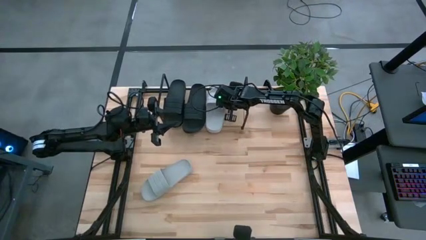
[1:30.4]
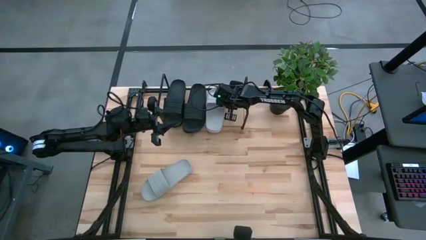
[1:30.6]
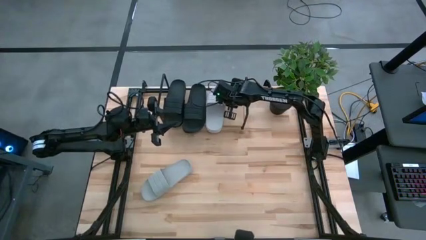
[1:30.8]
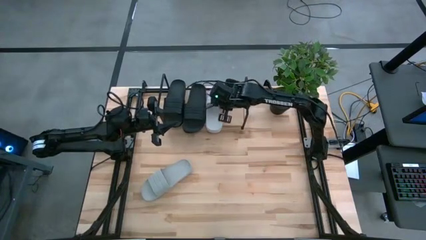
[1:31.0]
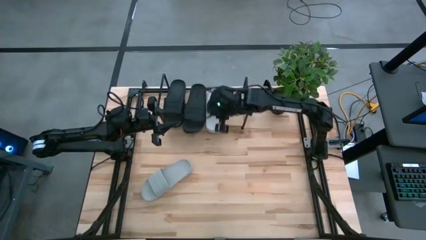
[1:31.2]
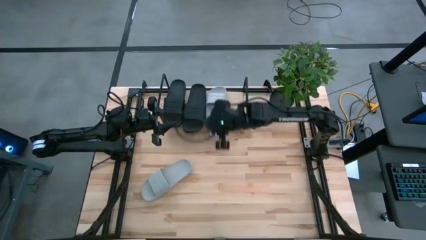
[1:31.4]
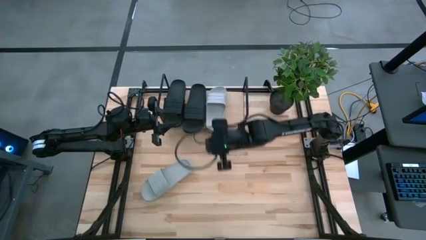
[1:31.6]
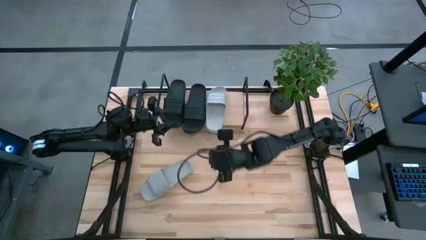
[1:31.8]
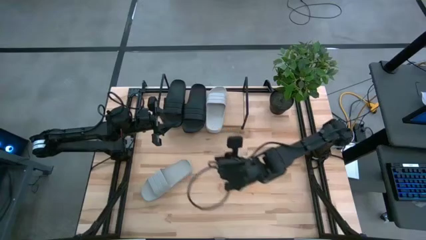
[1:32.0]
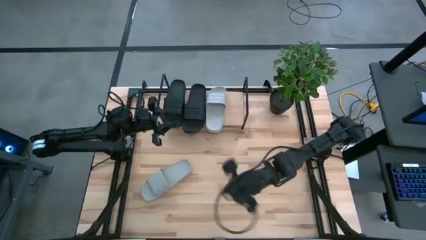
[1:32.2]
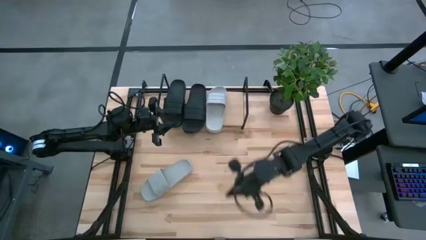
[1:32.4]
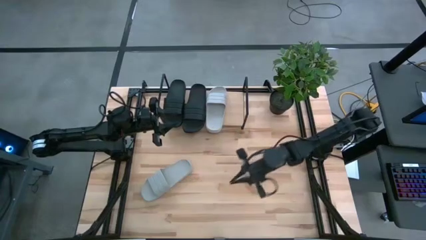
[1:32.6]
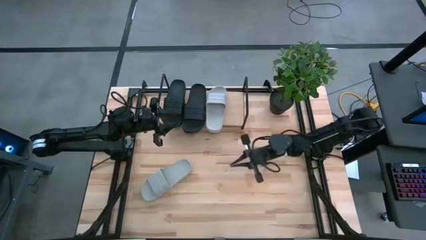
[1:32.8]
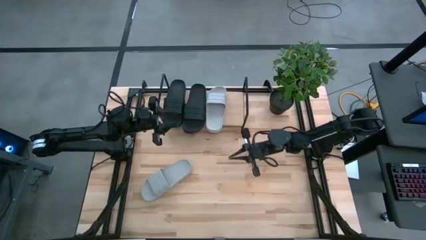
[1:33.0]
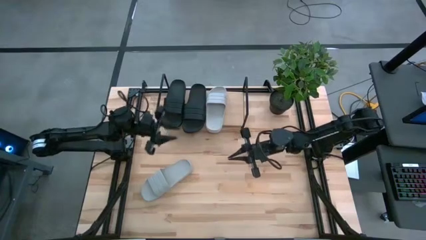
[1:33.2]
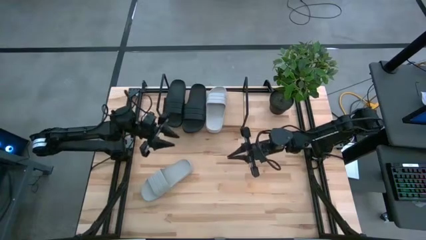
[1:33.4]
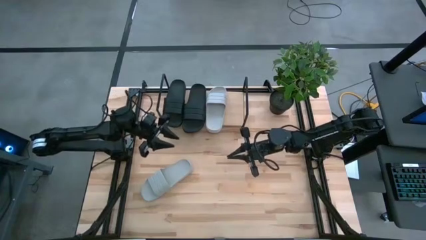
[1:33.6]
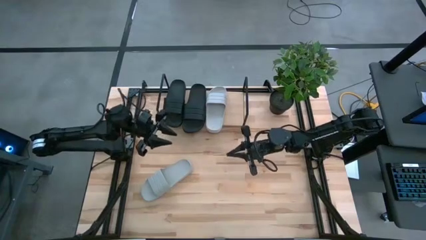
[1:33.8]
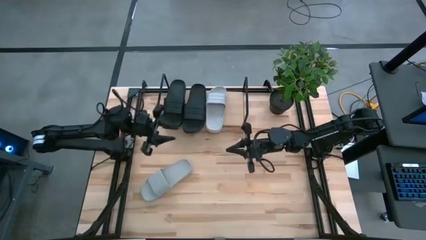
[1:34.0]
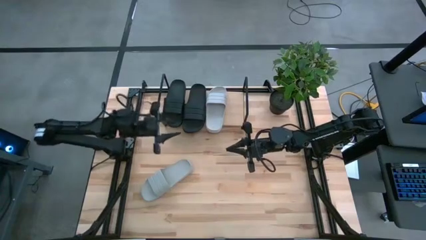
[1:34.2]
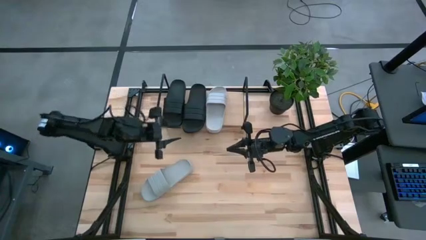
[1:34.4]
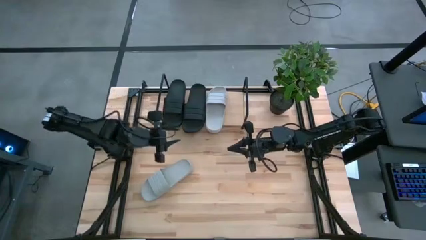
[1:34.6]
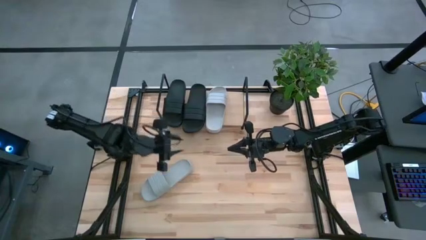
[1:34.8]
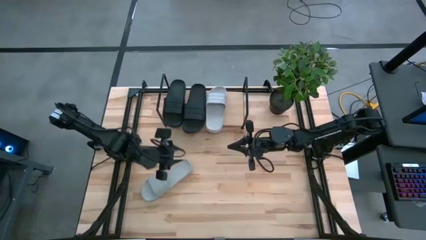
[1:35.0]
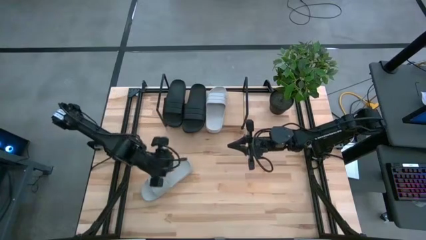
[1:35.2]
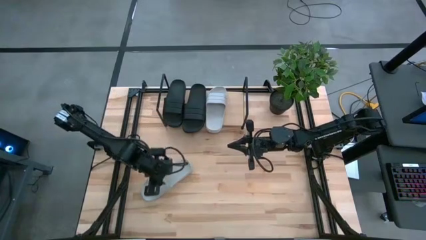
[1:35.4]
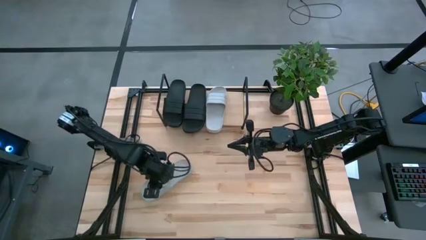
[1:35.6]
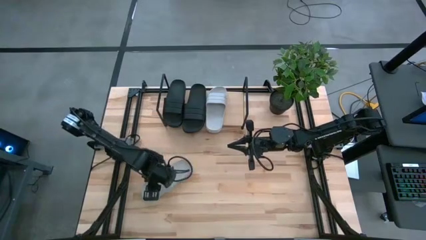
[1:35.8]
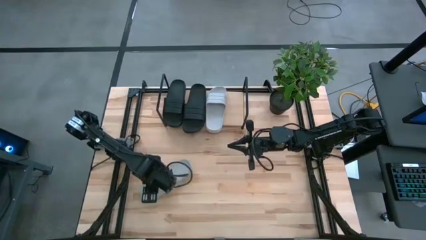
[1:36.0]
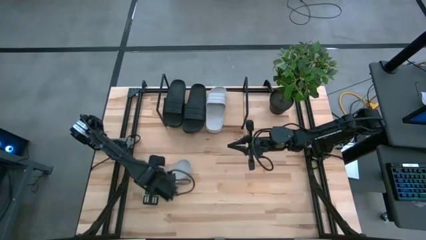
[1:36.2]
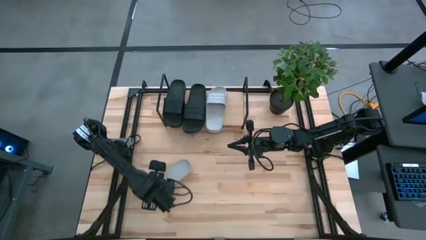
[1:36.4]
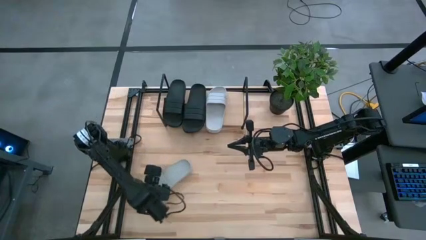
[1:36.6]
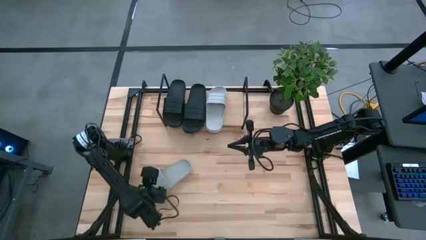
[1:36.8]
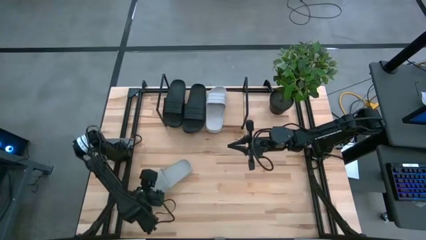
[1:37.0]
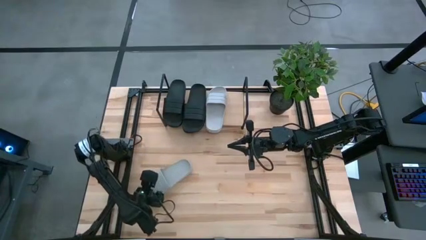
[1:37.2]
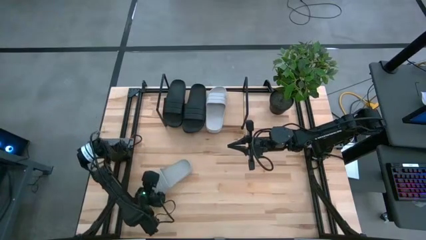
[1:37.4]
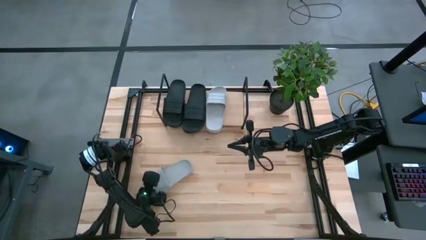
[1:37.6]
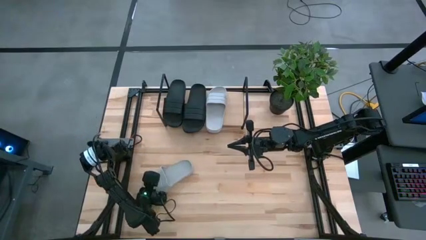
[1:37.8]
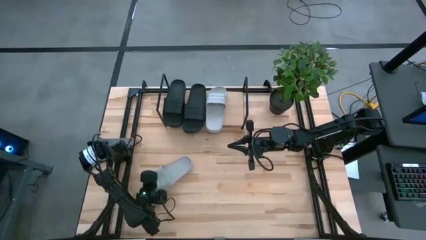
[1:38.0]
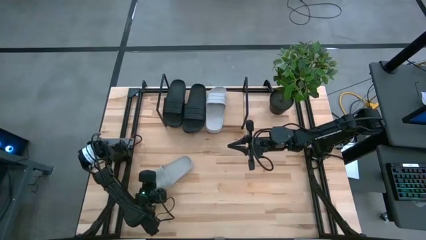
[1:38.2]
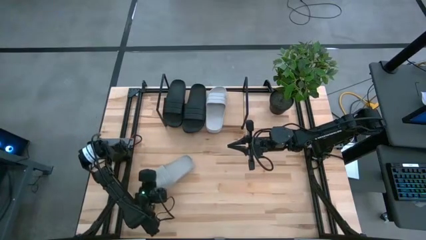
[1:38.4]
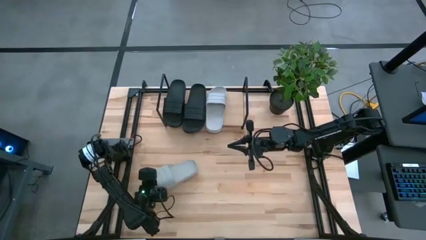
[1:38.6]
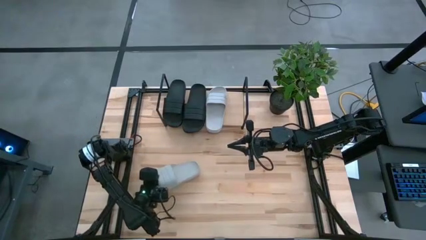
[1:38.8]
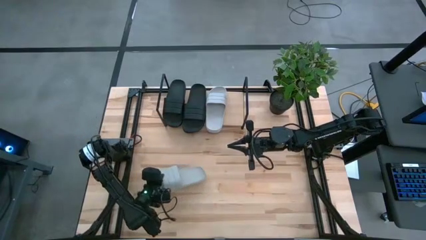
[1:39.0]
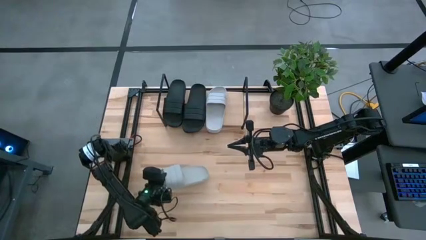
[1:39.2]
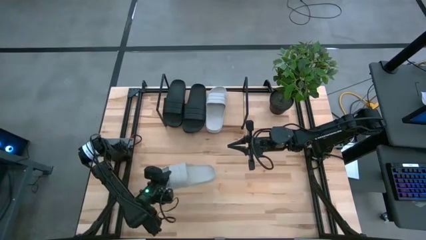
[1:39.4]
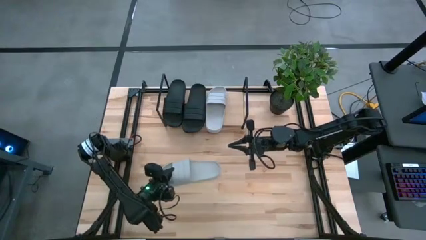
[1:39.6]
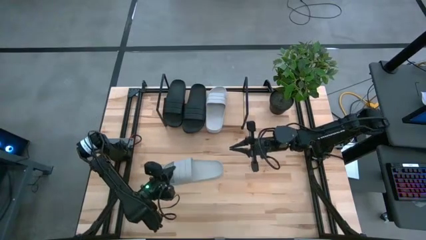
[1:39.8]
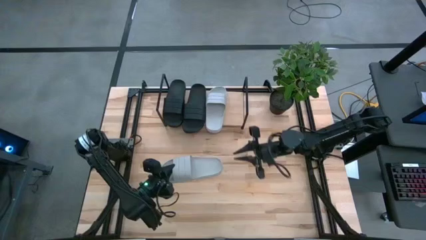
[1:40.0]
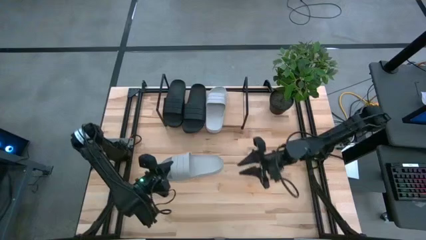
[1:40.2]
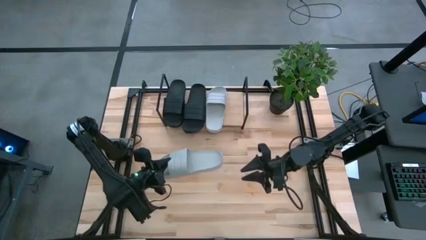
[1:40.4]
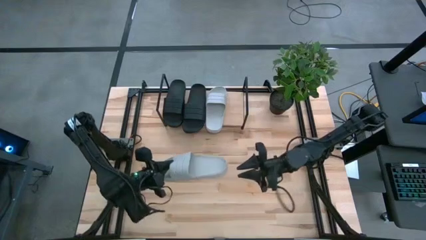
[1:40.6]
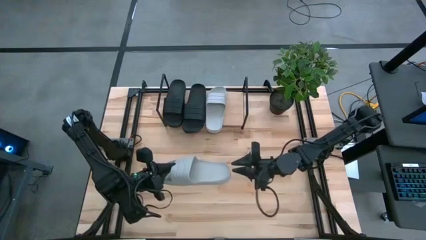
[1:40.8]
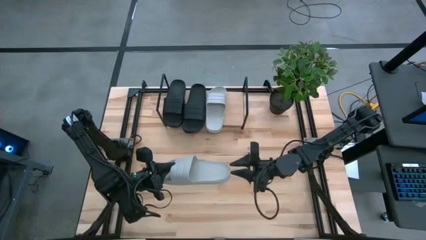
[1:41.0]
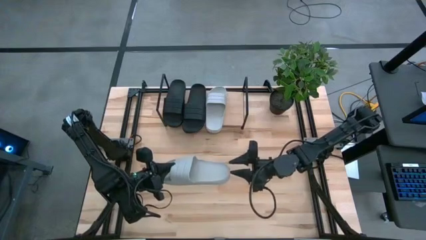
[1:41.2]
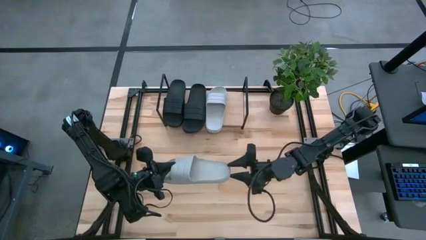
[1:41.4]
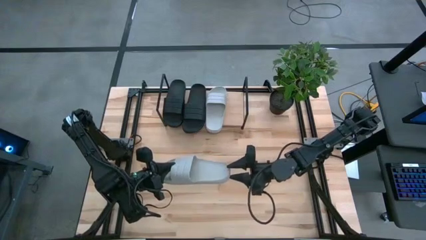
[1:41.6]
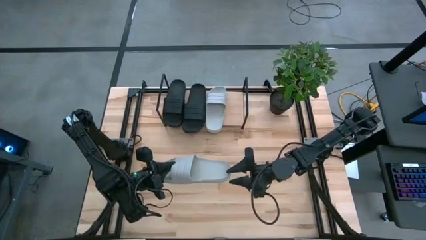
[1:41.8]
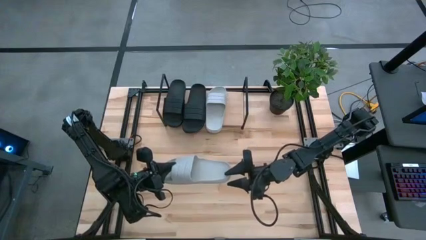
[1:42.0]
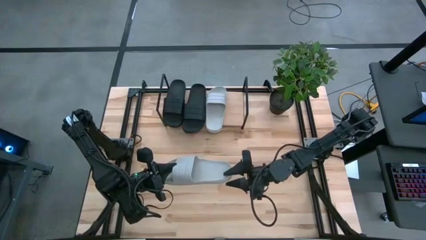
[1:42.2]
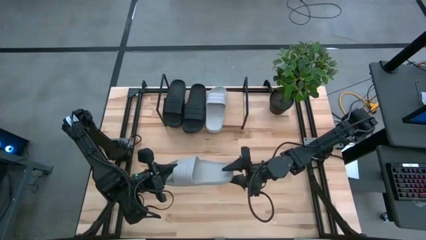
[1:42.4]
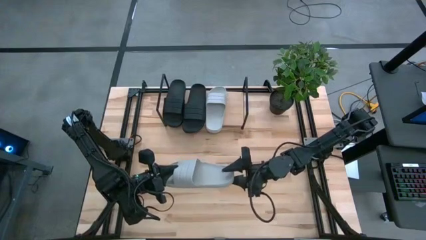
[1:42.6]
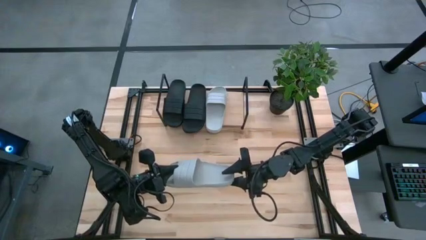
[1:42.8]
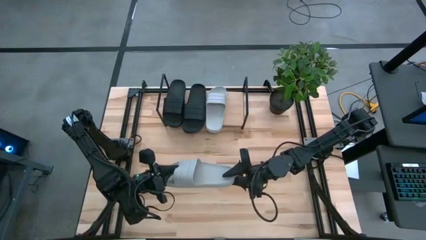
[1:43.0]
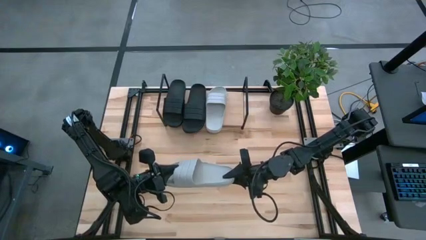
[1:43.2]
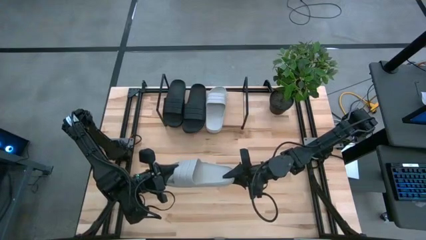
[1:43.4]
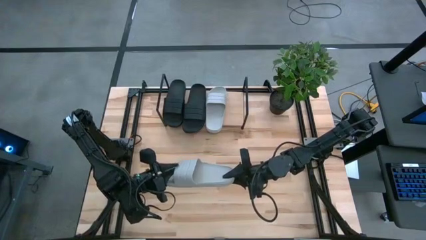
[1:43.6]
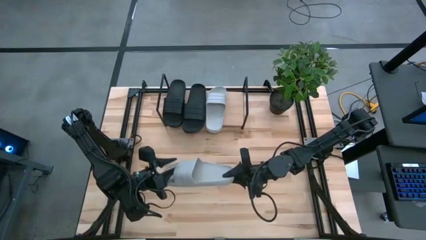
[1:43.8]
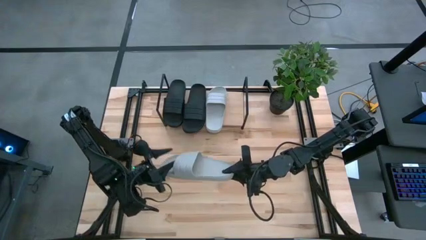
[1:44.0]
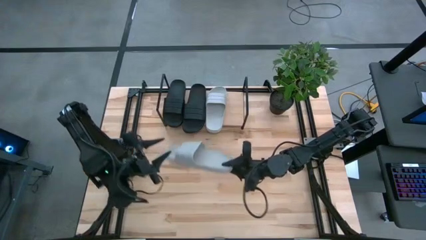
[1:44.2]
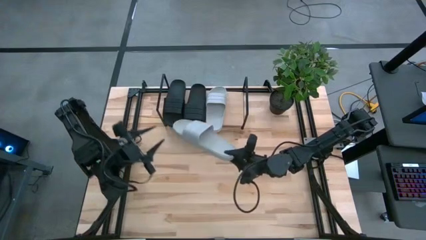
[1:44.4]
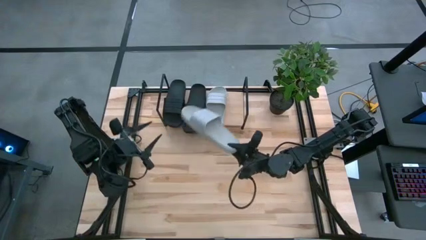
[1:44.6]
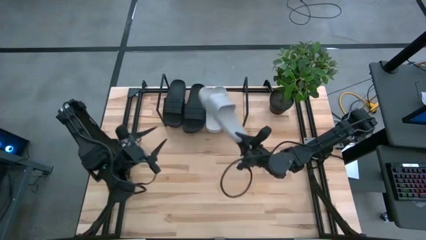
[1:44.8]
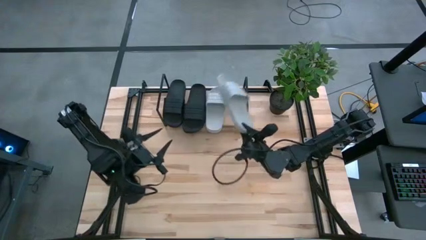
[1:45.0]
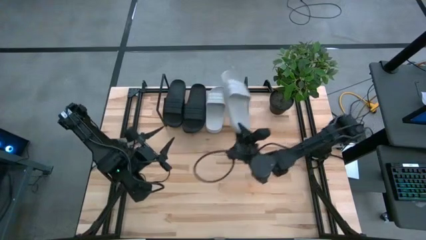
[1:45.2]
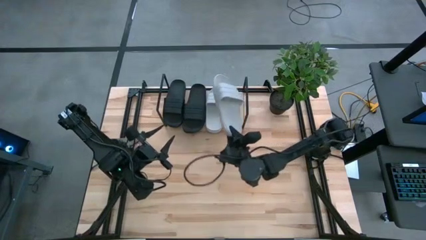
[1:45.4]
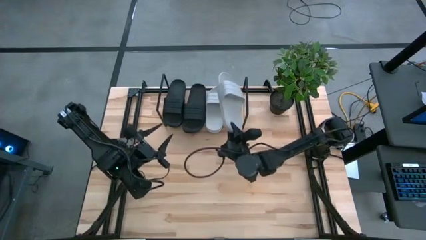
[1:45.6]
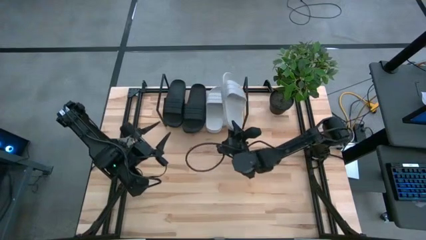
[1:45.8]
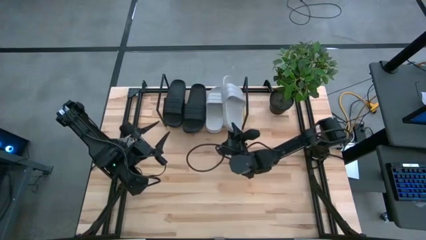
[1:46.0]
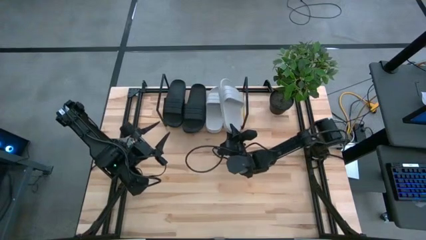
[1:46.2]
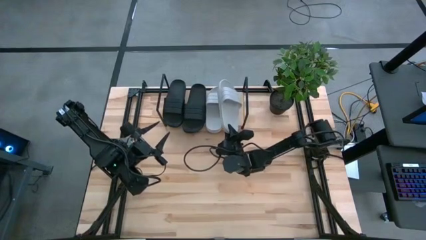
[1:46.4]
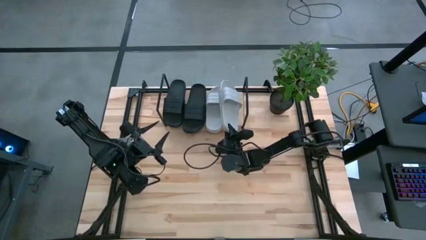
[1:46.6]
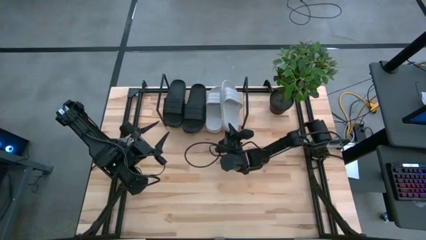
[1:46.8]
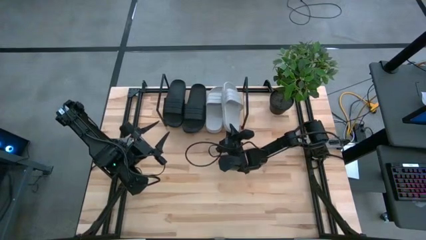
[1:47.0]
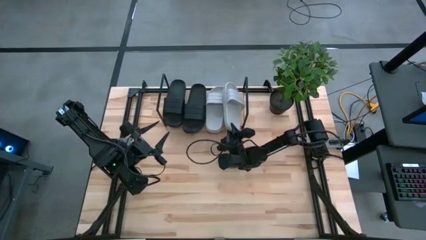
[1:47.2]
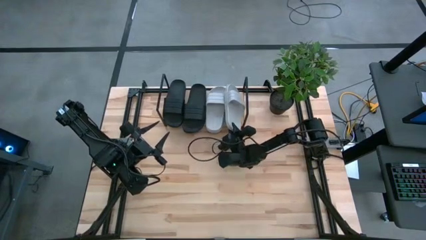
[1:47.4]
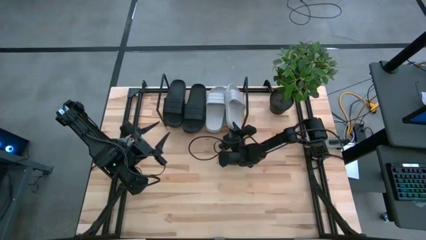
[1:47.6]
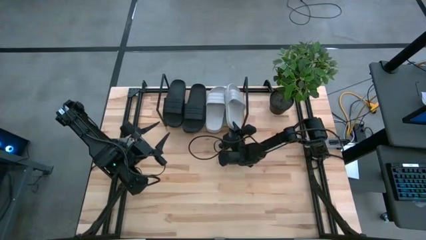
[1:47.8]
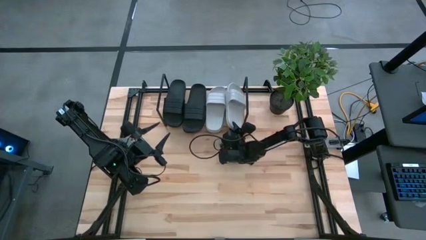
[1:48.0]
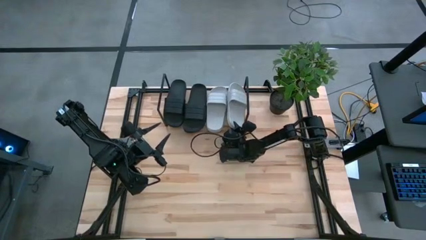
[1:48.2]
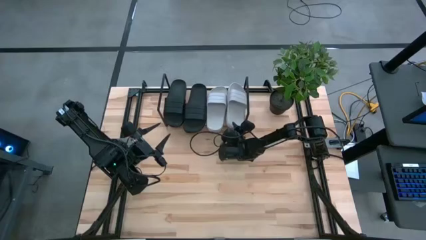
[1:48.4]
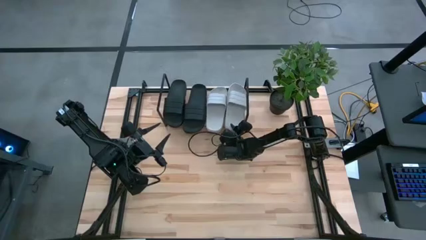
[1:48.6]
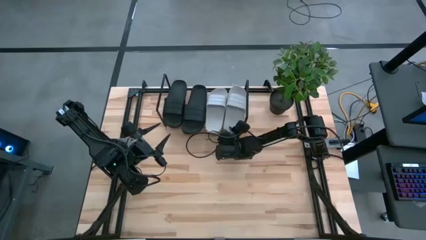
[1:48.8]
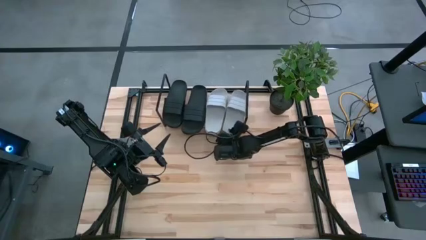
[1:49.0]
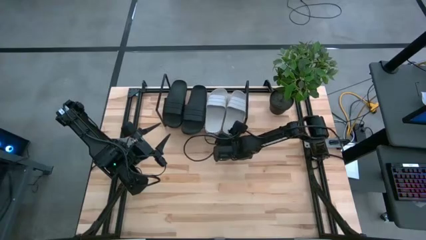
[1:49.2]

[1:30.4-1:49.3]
Task: Pick and place slides into the shelf
Put the gray slipper on the shelf
